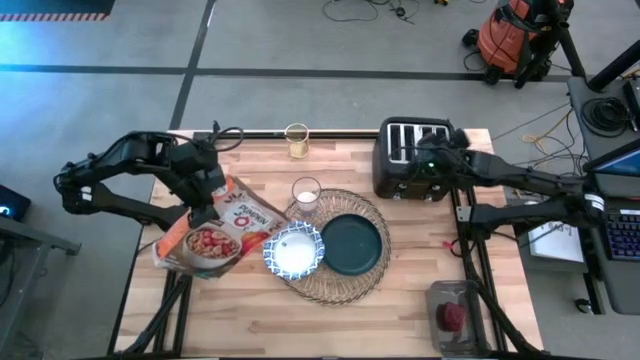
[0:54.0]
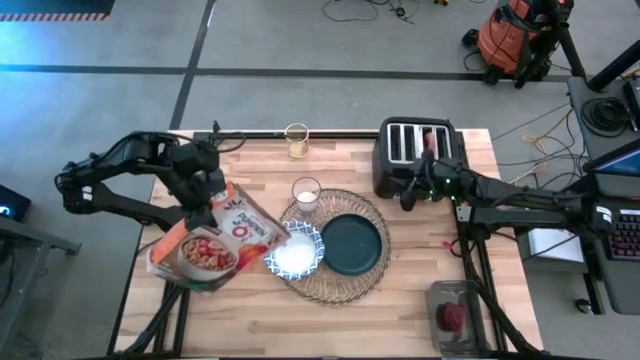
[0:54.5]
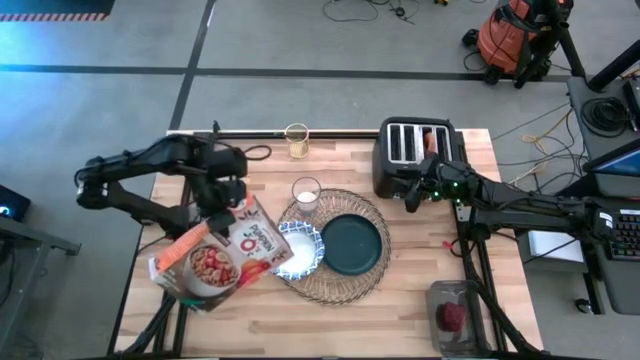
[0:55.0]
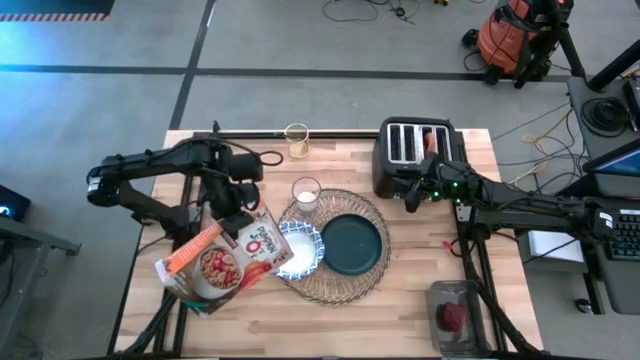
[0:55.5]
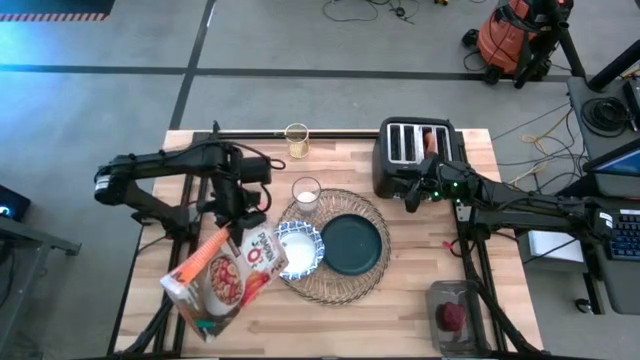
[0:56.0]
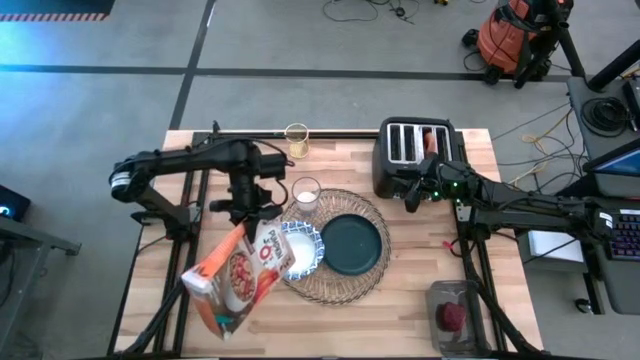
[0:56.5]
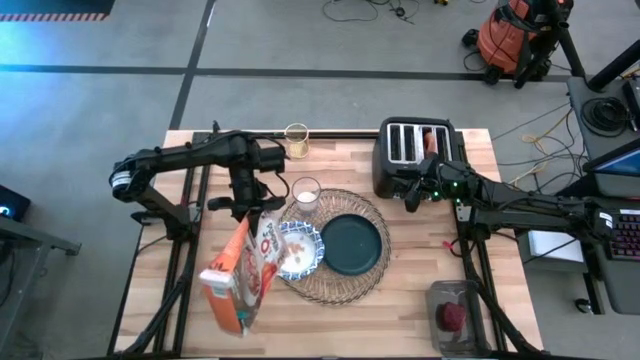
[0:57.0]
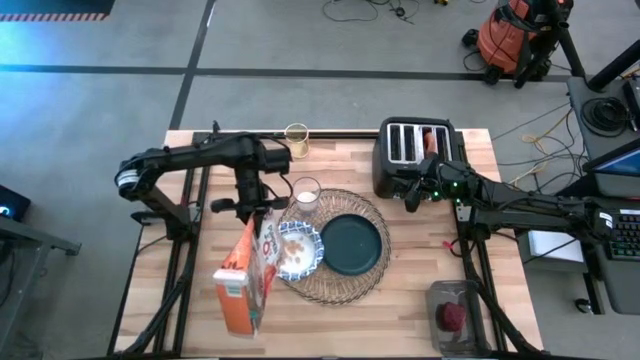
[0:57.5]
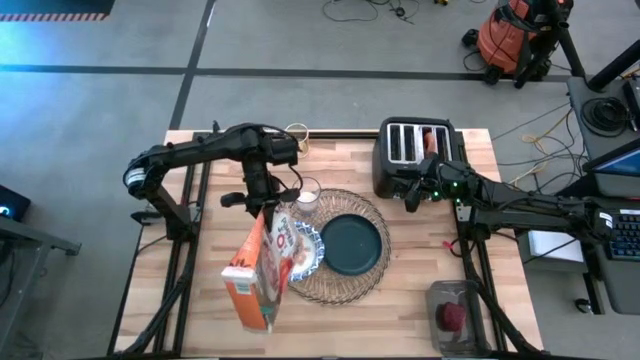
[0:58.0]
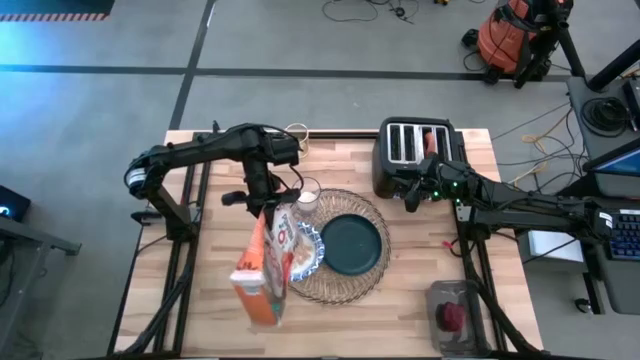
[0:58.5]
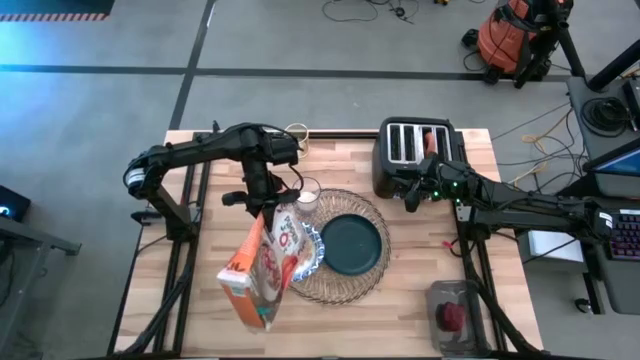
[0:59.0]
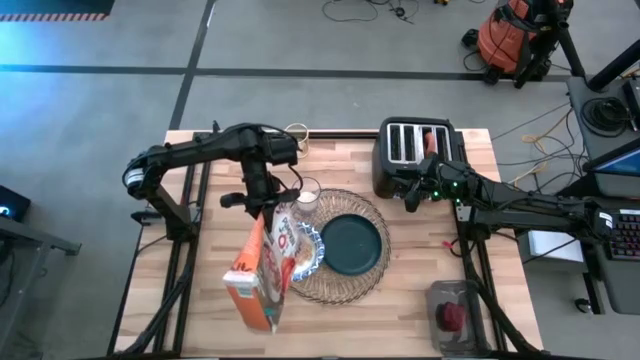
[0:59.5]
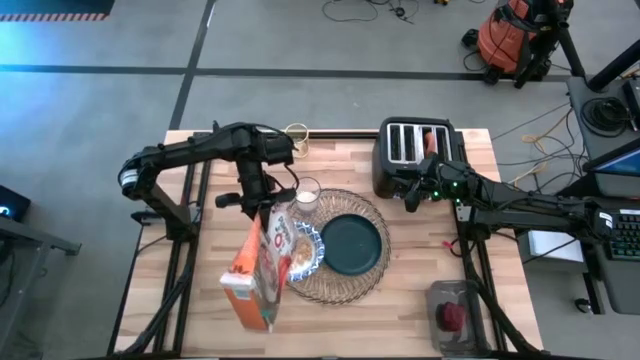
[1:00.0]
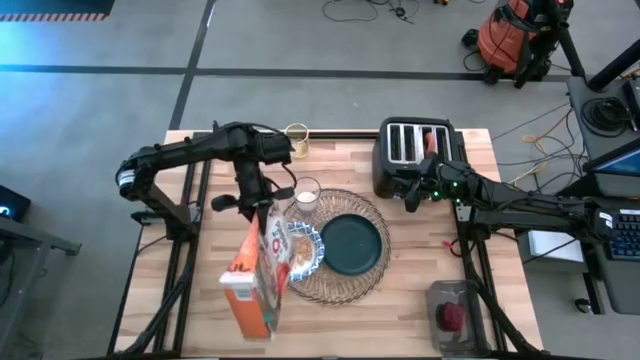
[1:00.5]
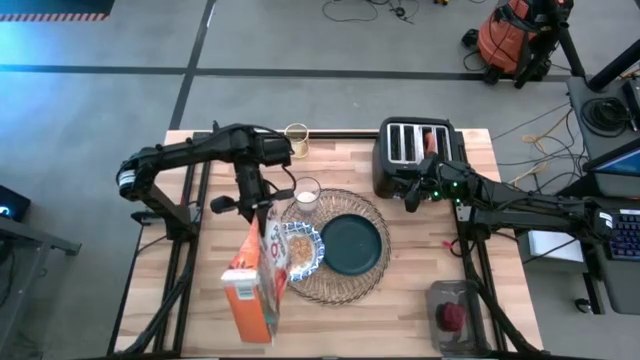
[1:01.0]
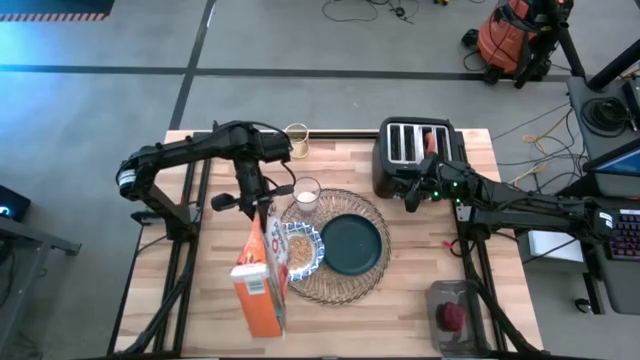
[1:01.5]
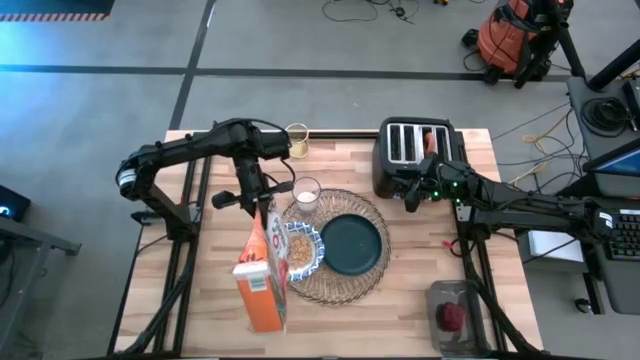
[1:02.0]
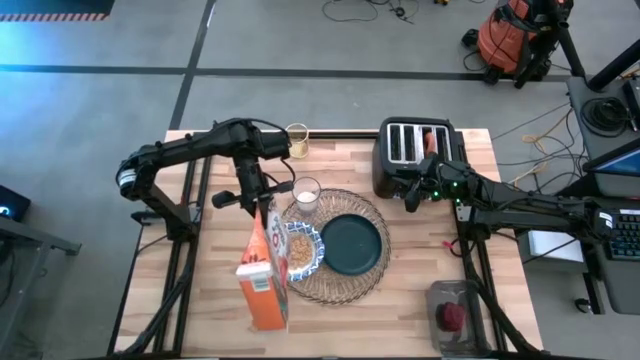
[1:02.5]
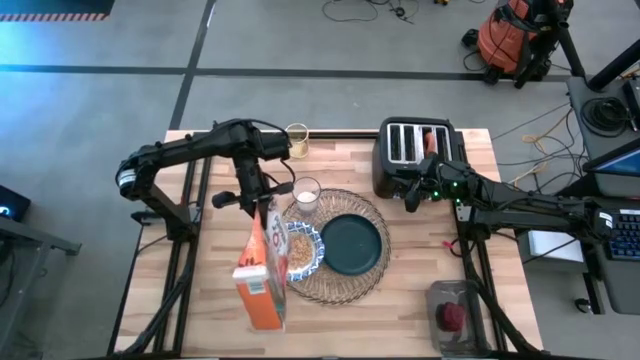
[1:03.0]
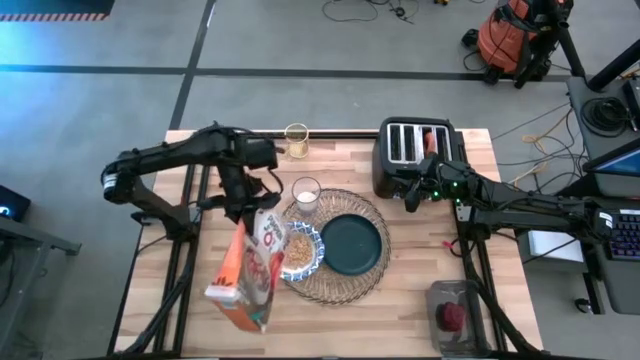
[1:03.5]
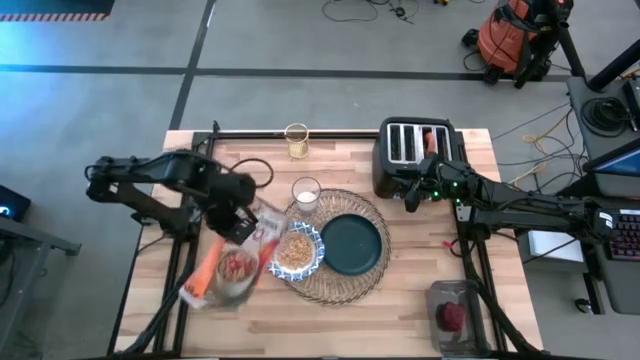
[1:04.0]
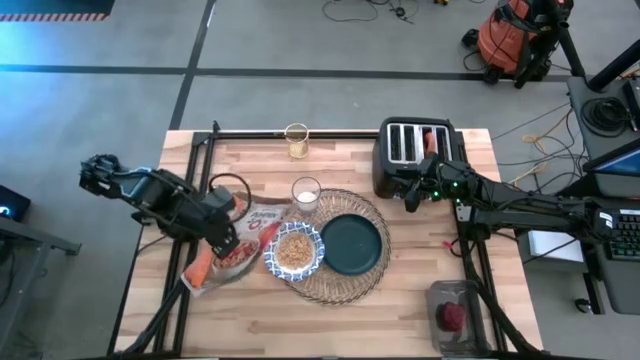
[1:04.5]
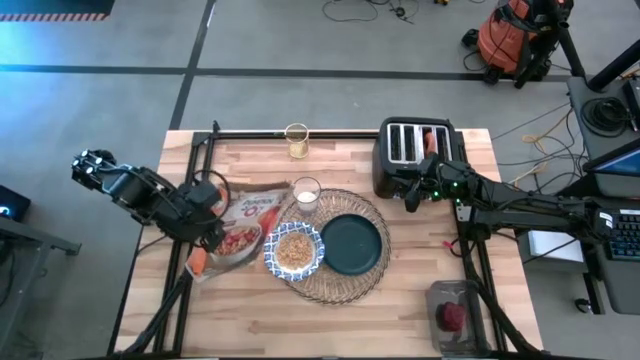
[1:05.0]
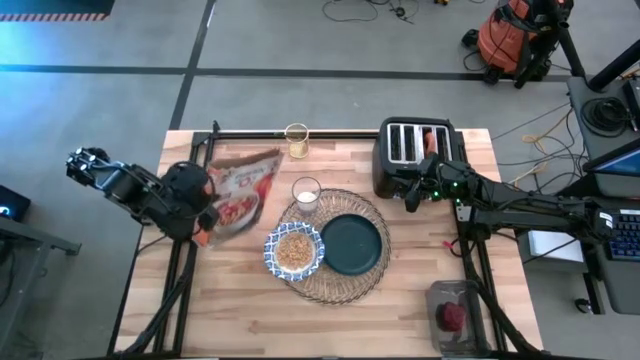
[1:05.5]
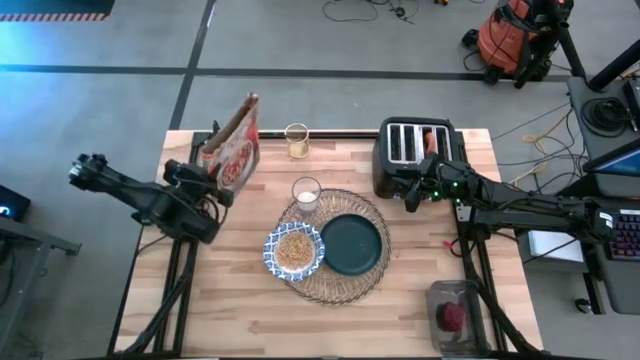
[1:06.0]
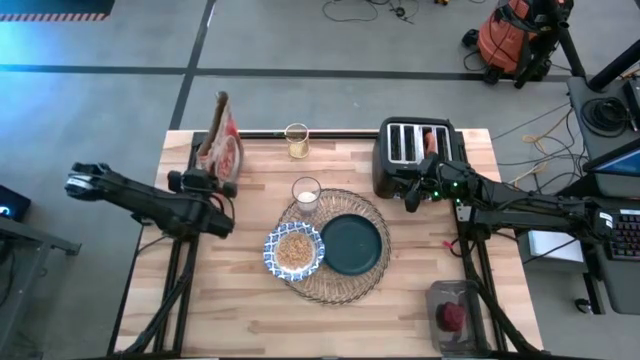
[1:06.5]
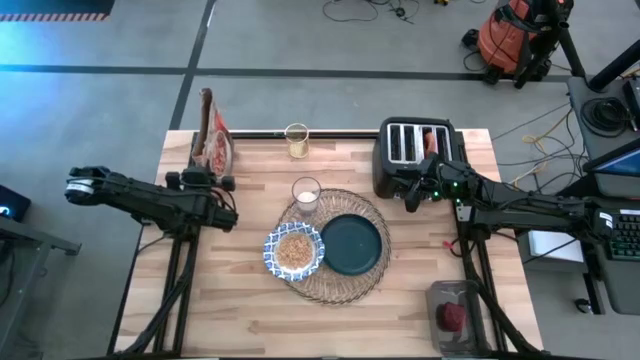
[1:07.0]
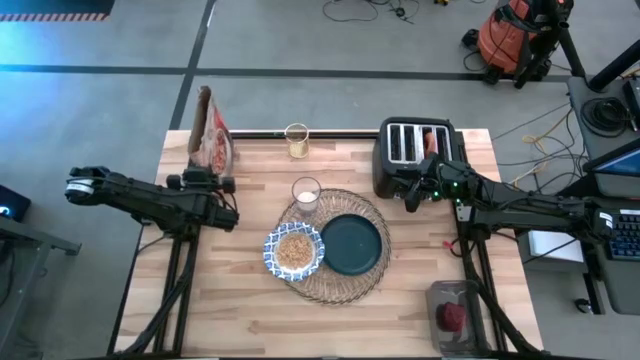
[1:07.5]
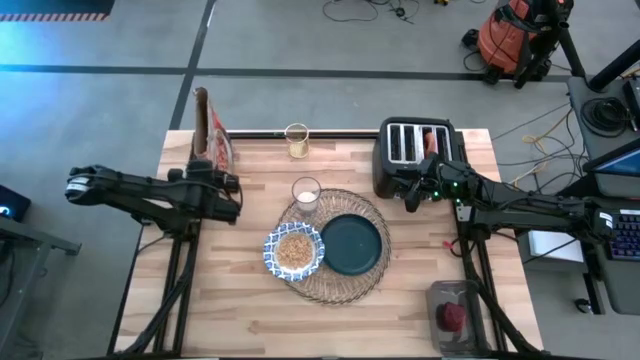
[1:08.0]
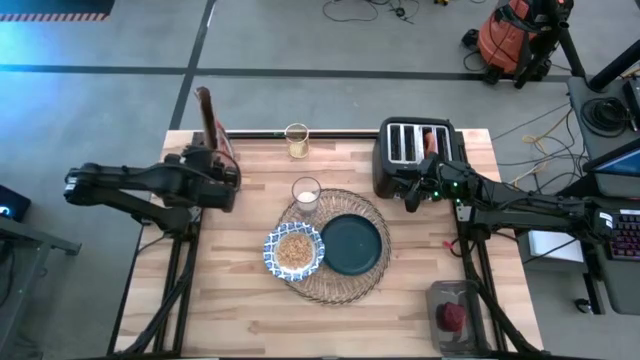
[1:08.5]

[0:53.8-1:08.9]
Task: Arrange a breakfast setting
Pour the cereal from the orange cereal box into the white bowl

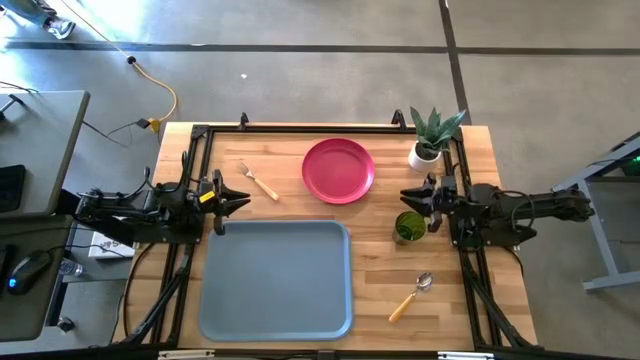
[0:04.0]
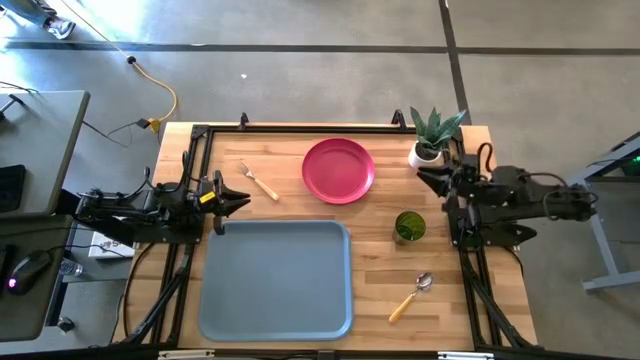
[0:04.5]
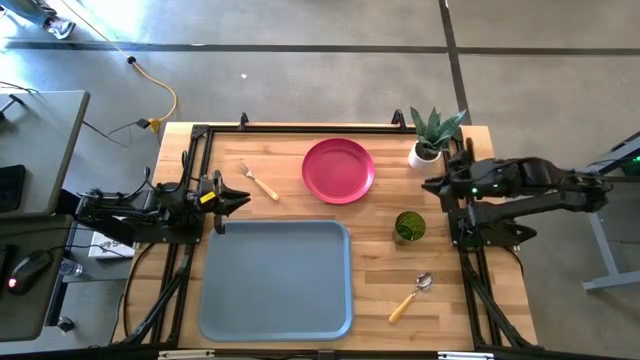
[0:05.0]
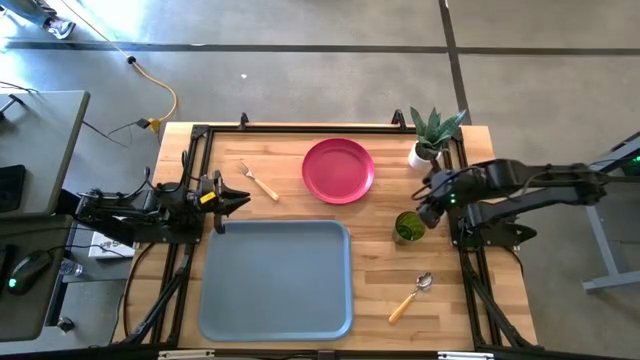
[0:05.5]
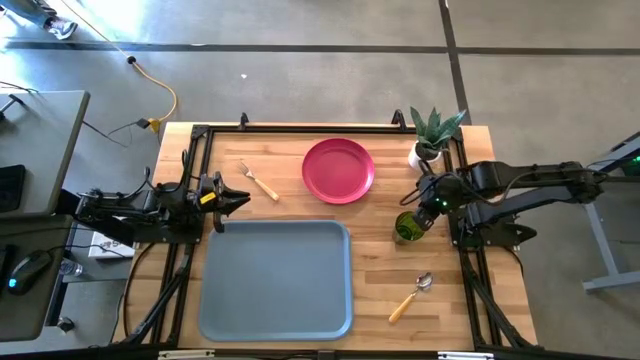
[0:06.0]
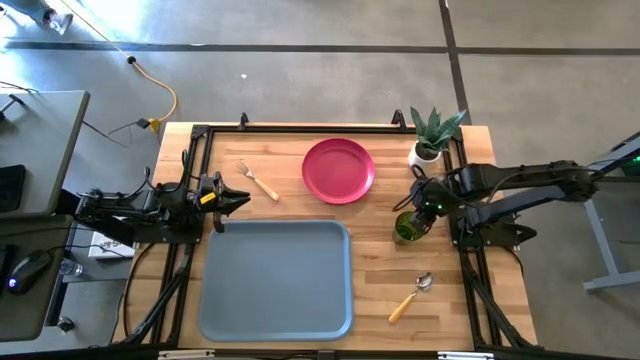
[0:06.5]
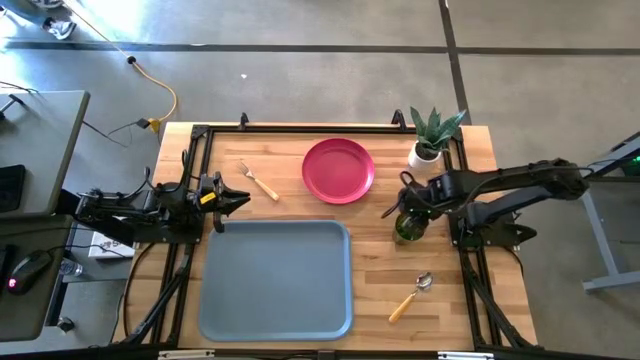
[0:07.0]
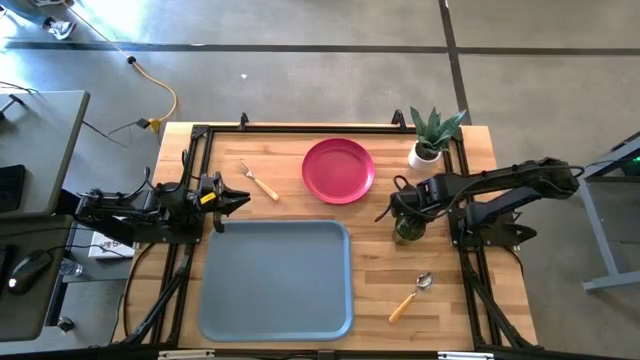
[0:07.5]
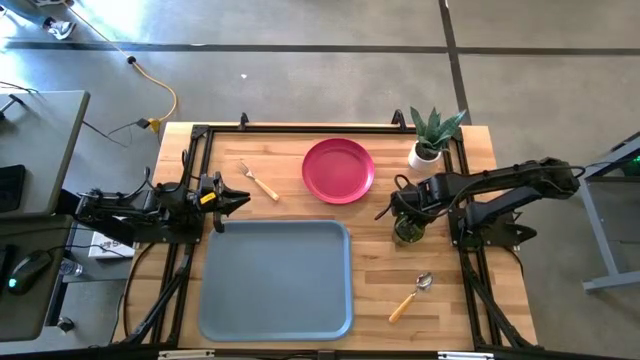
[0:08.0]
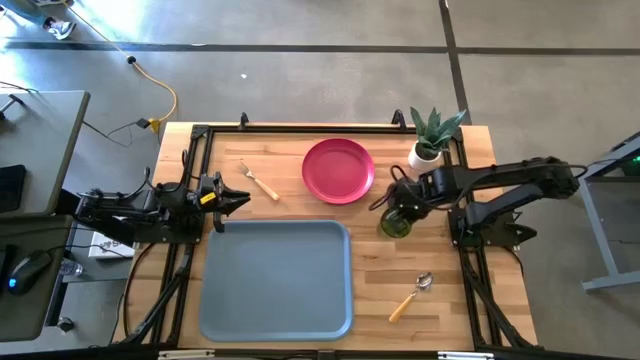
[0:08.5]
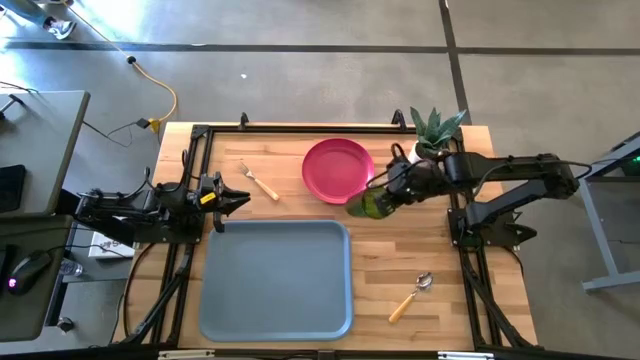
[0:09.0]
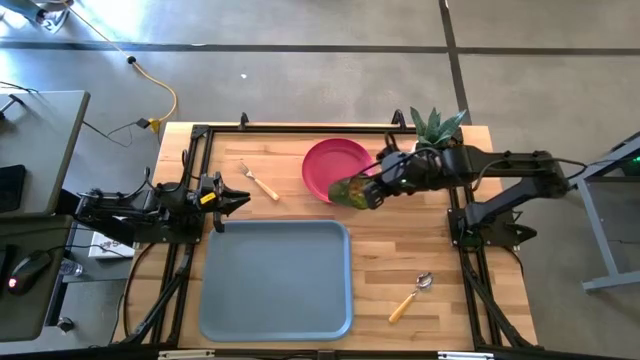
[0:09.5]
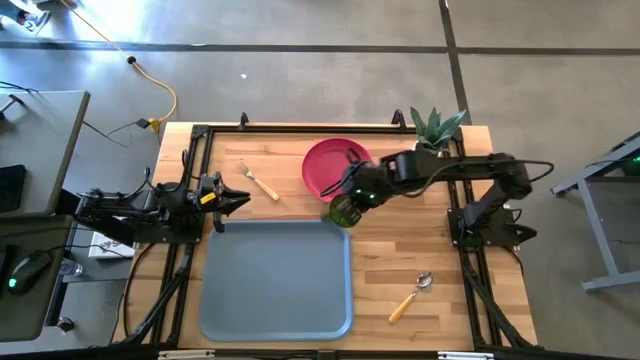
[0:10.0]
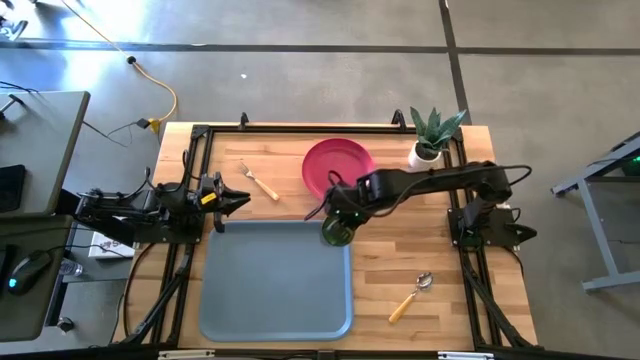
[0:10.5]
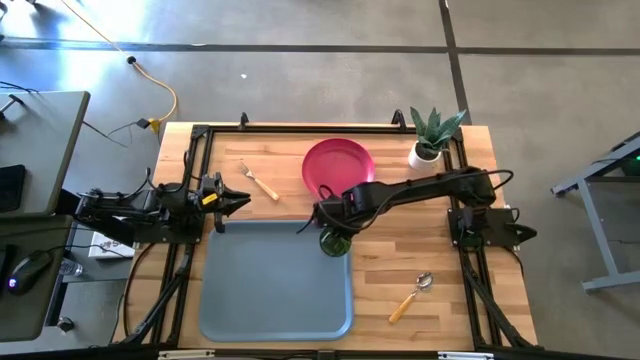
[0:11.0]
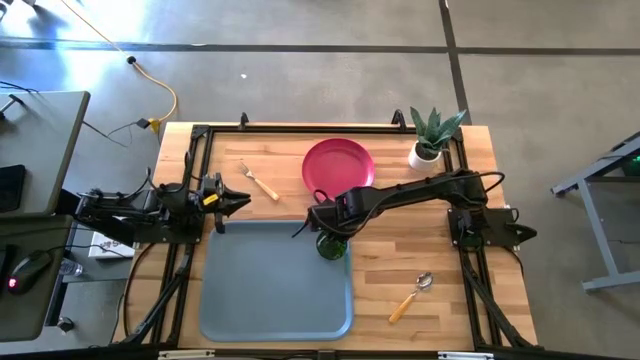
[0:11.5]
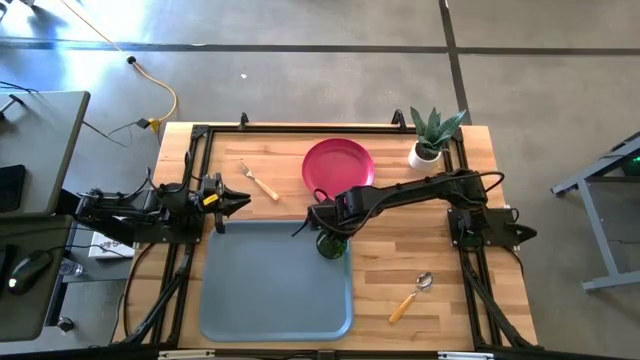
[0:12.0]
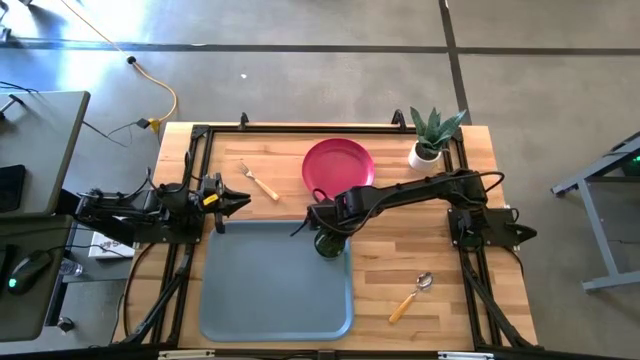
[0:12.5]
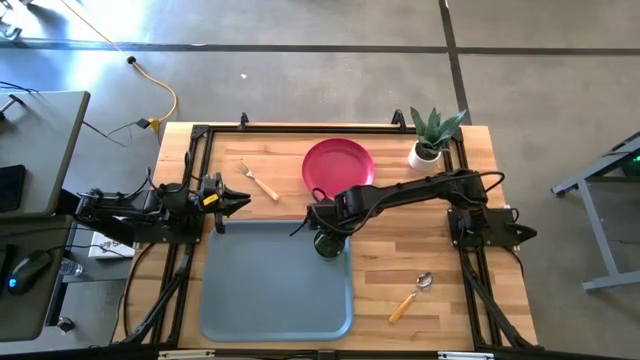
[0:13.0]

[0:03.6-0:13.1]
Task: Pick and place plate/cup/fork/spoon on tray
Put the green glass on the blue serving tray
